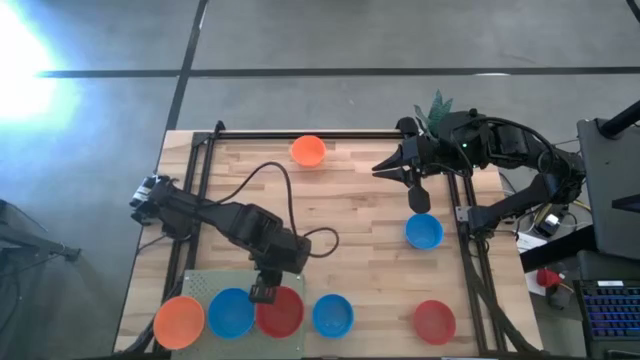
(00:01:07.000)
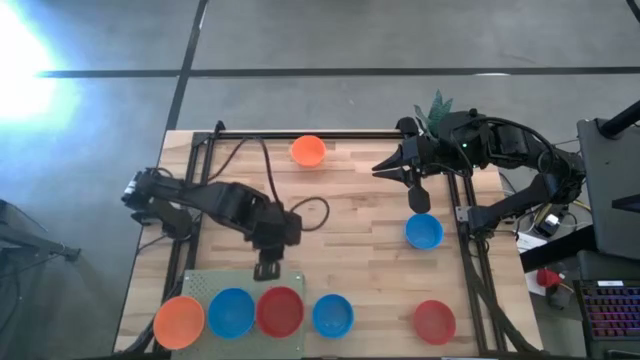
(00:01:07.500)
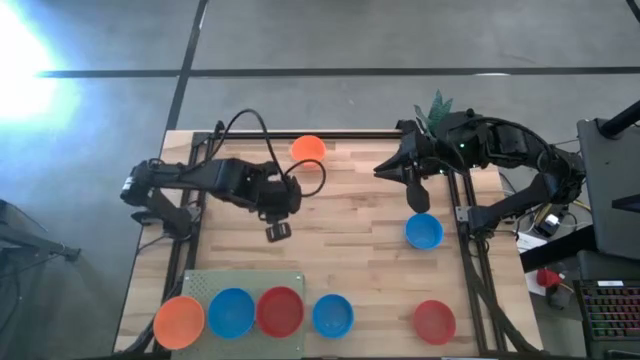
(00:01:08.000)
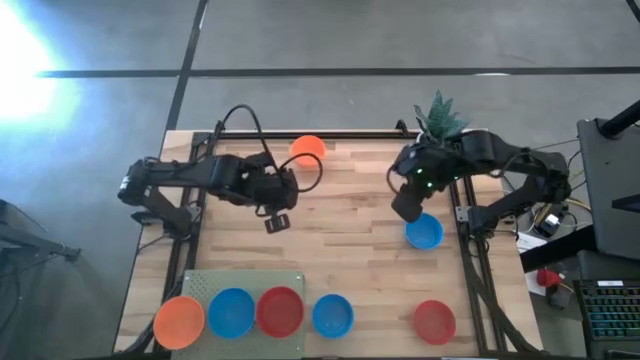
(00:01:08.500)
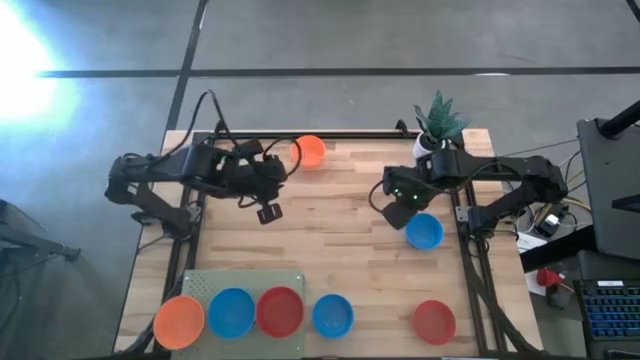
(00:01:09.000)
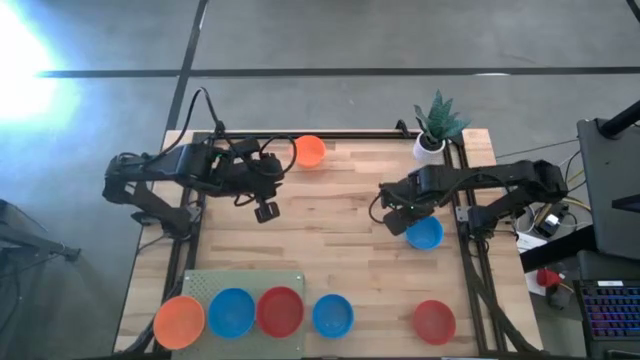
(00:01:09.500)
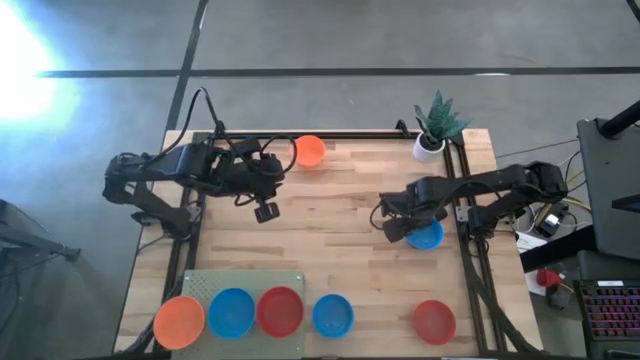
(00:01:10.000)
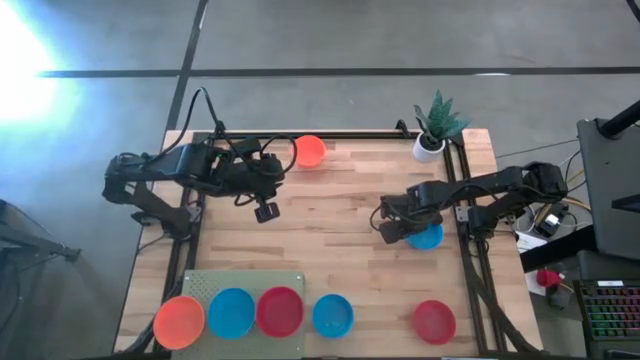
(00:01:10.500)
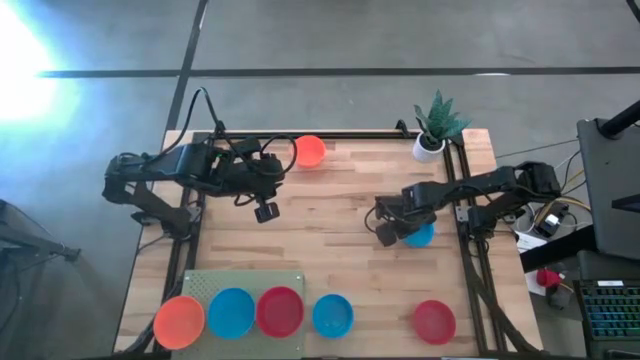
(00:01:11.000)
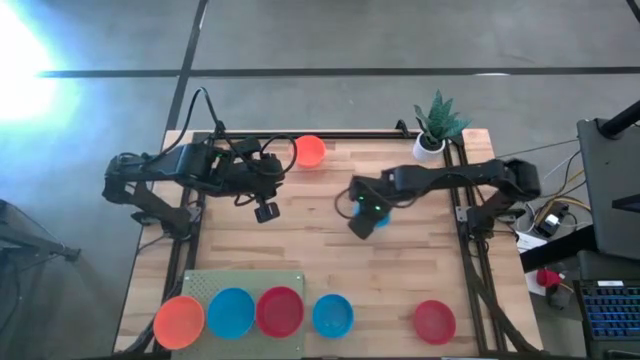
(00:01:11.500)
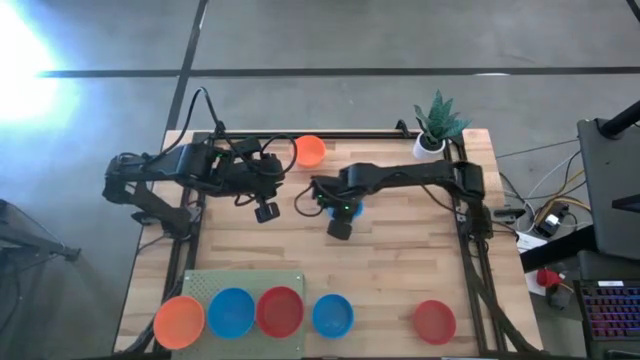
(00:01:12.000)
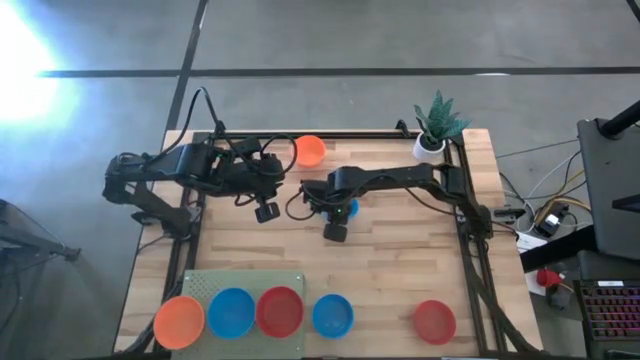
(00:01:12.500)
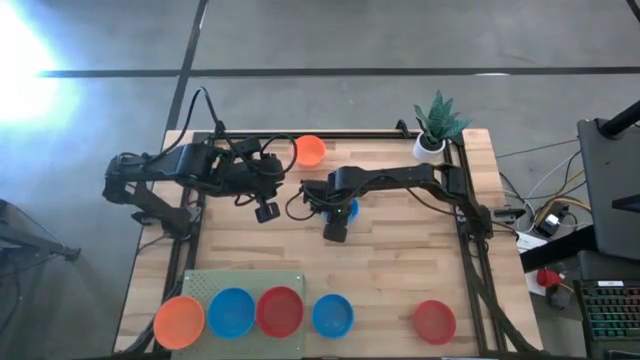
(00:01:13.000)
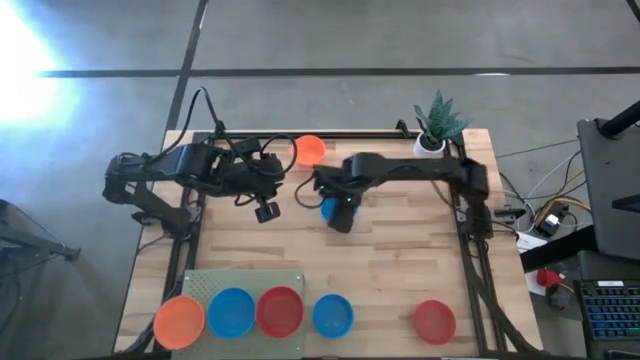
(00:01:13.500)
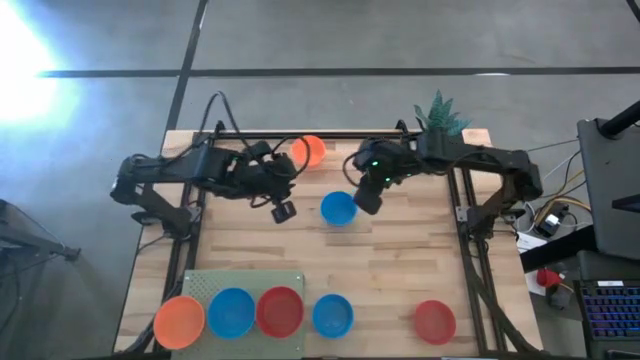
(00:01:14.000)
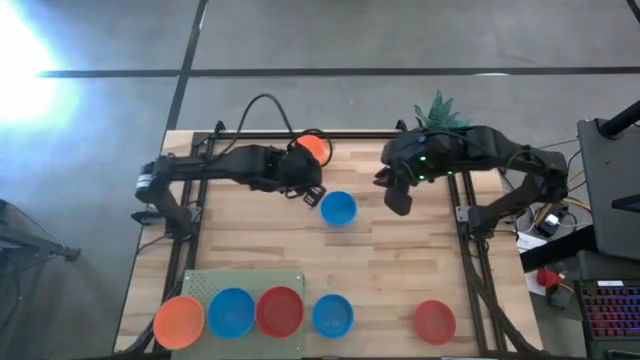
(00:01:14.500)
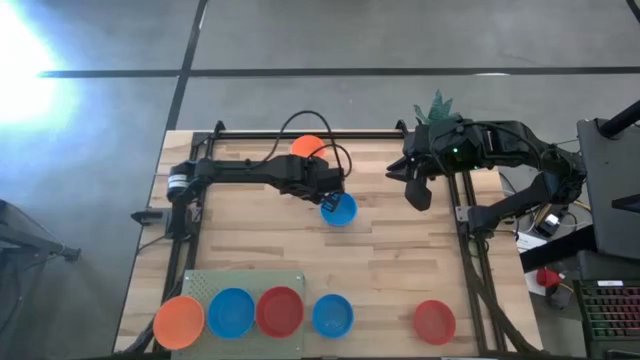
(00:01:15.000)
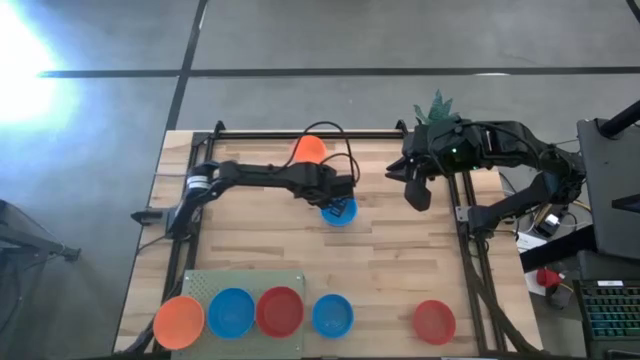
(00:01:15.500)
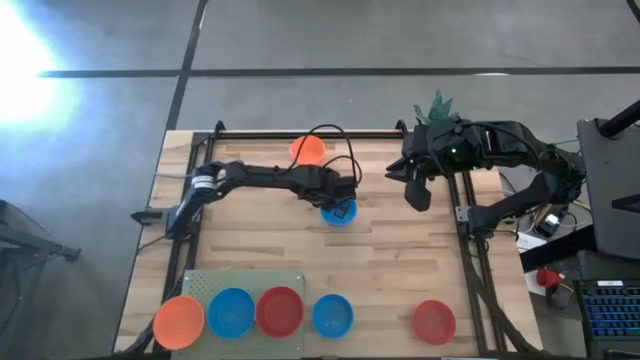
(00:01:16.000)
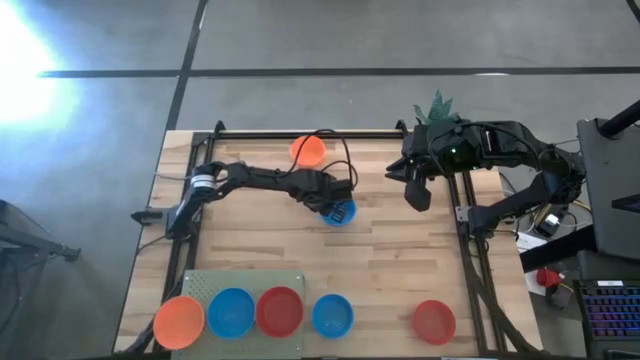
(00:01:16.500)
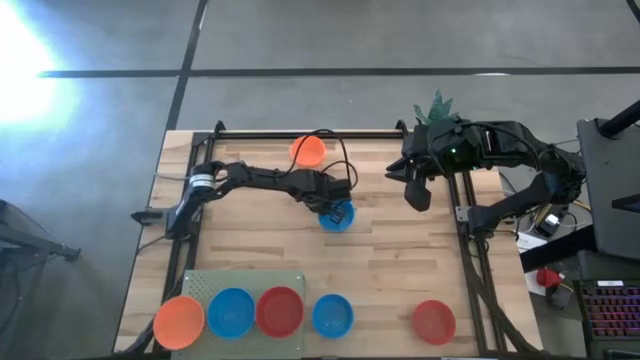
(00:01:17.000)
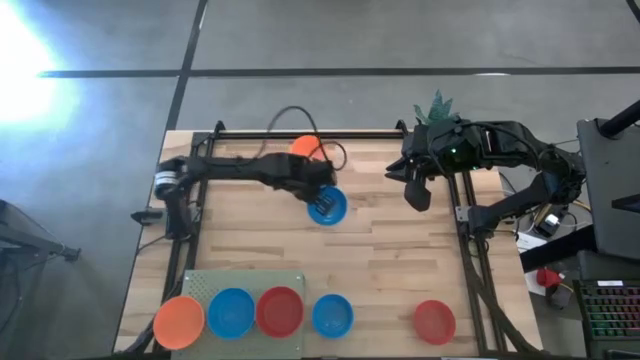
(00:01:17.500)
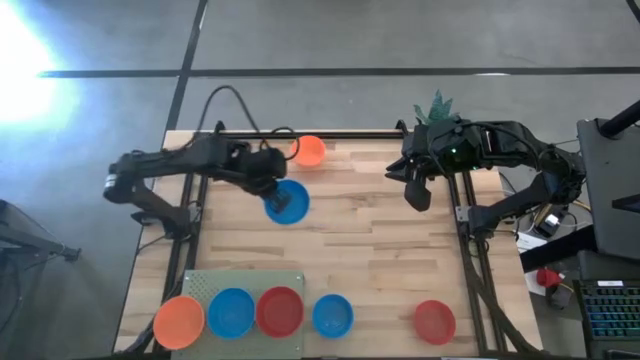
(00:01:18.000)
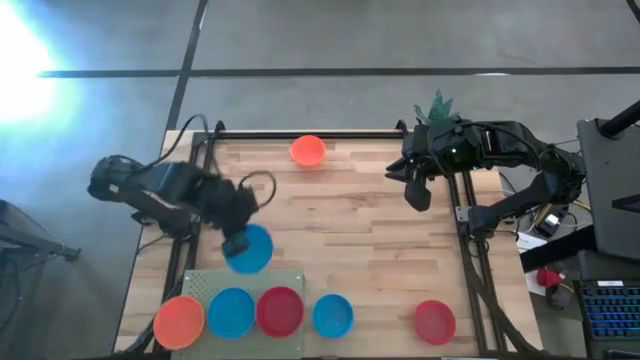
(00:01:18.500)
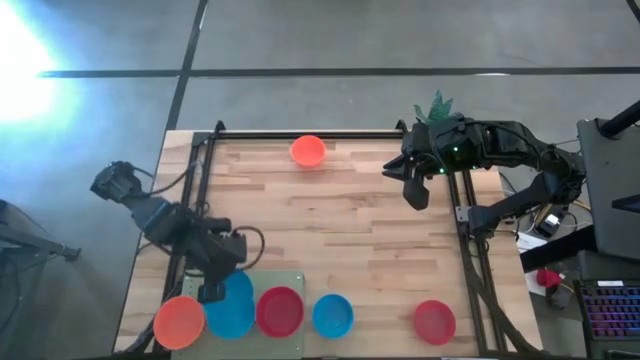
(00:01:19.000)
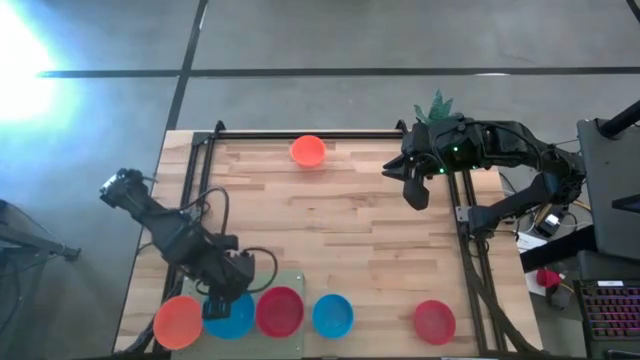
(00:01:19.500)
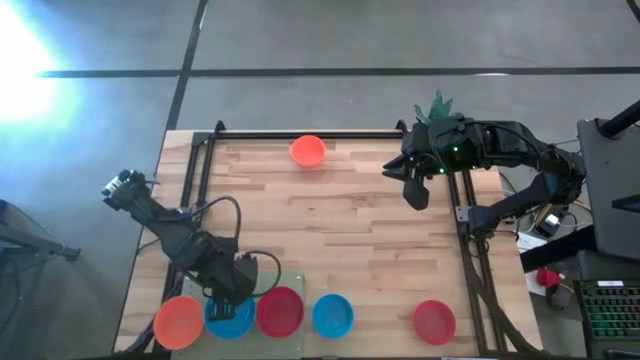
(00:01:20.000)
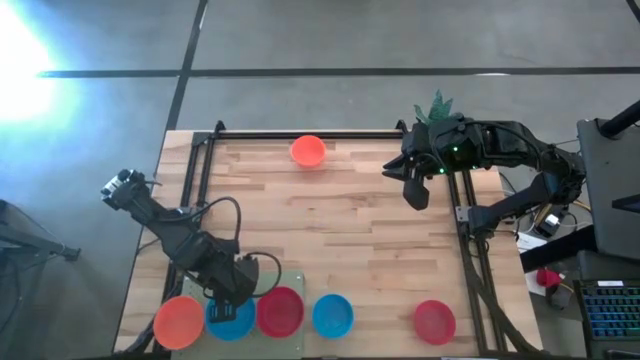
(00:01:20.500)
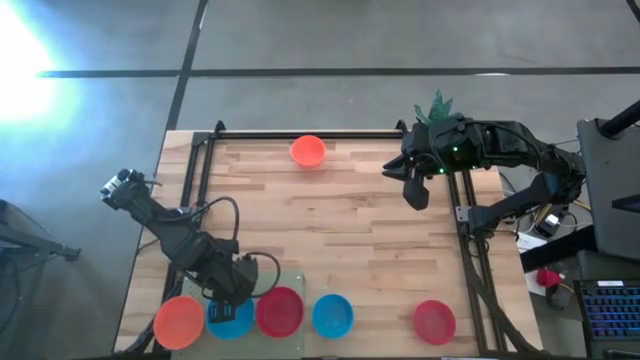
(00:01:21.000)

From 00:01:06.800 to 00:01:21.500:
Task: Pick & Place Mini bowls
Stack the top blue bowl on the blue bowl on the shelf

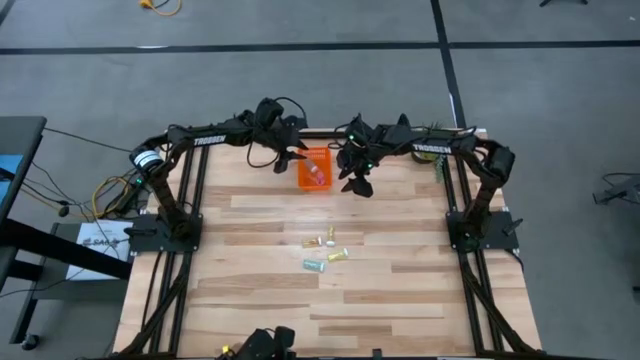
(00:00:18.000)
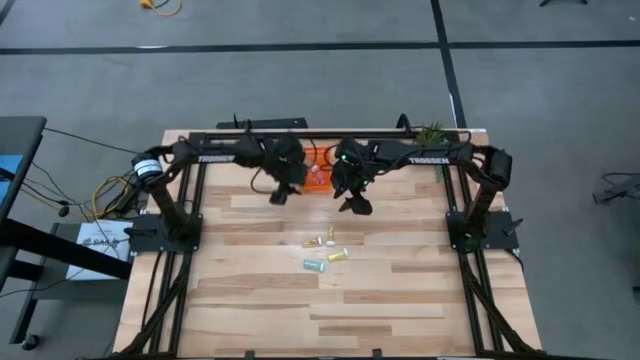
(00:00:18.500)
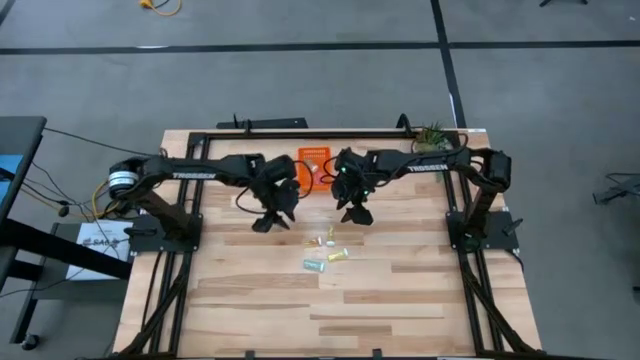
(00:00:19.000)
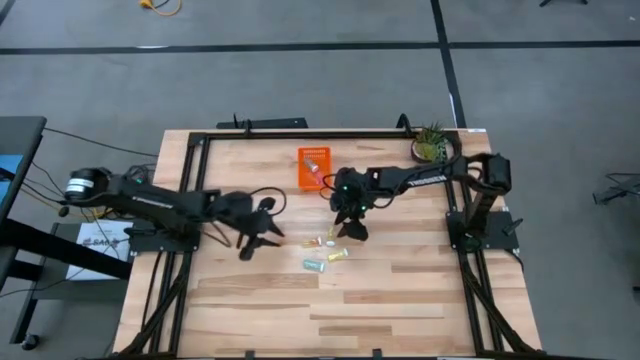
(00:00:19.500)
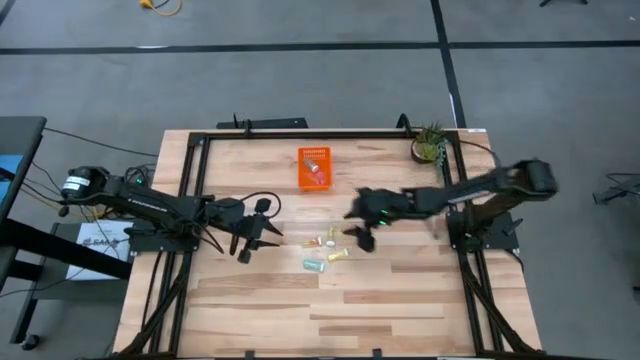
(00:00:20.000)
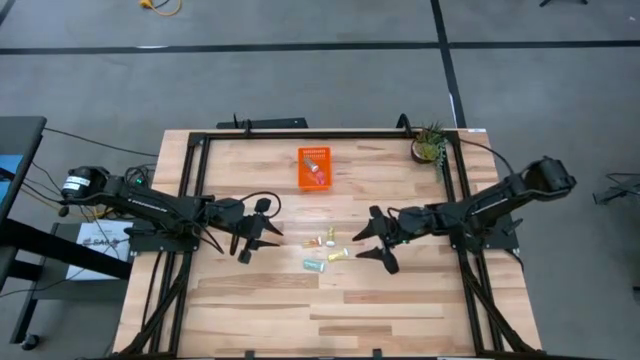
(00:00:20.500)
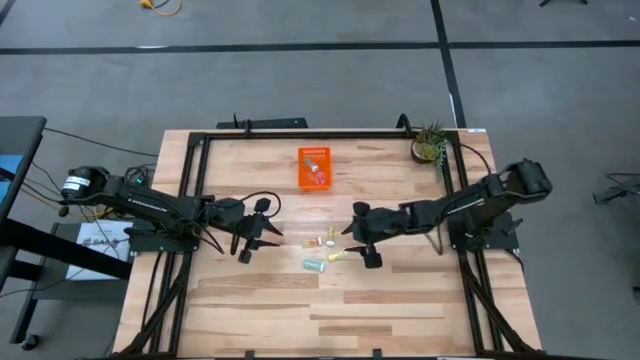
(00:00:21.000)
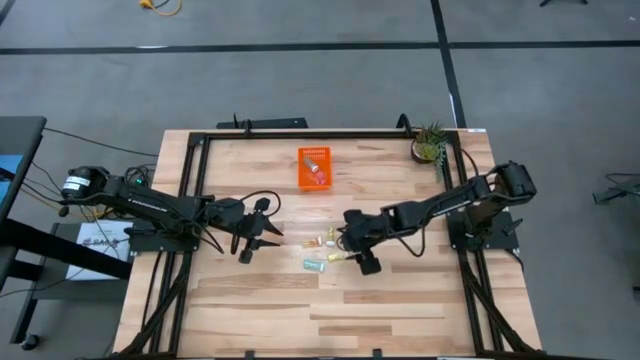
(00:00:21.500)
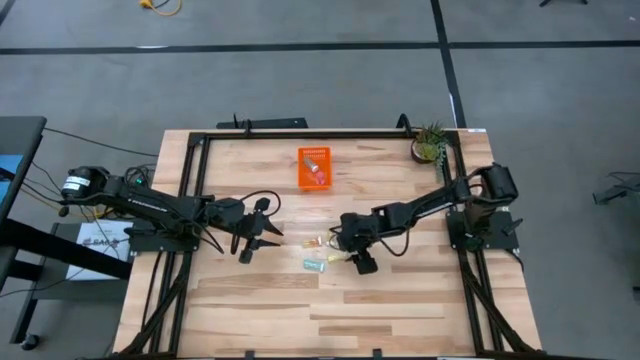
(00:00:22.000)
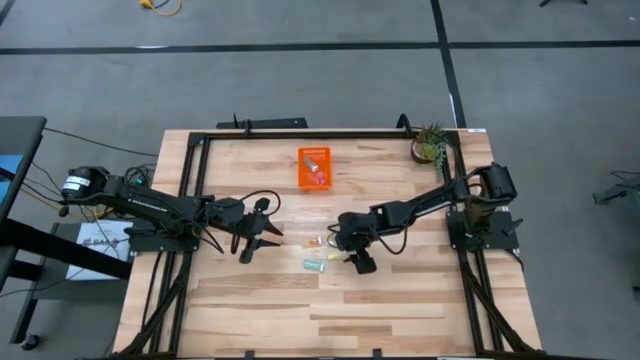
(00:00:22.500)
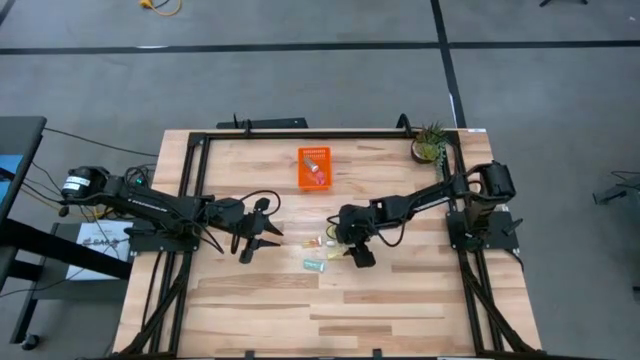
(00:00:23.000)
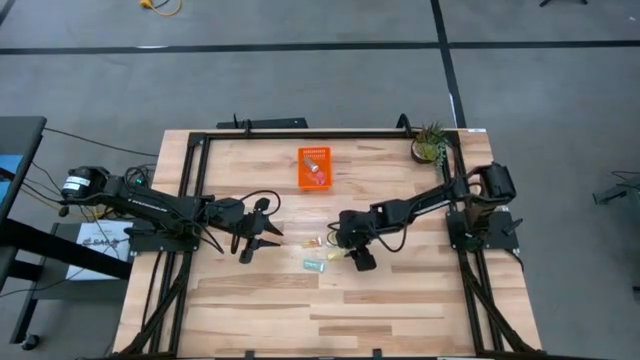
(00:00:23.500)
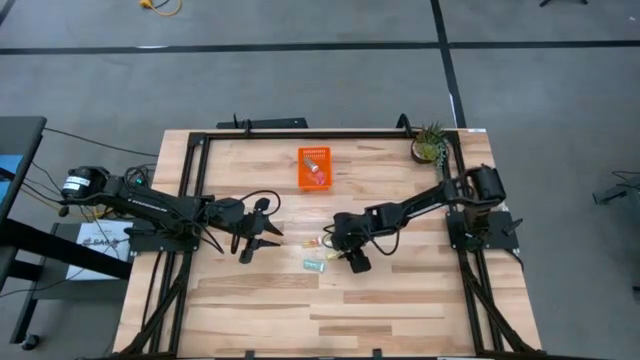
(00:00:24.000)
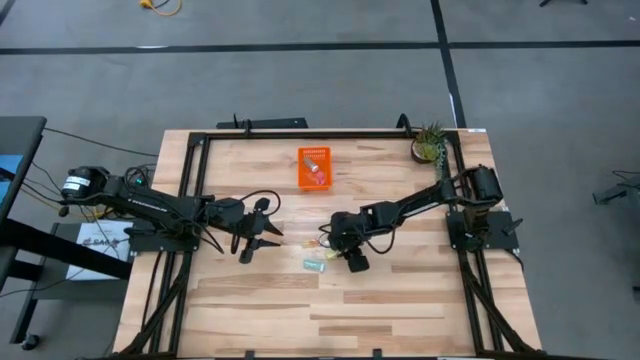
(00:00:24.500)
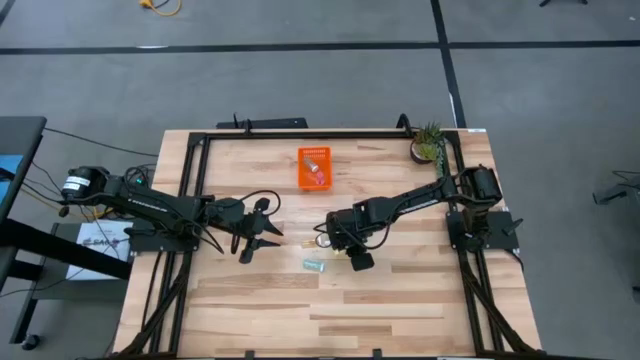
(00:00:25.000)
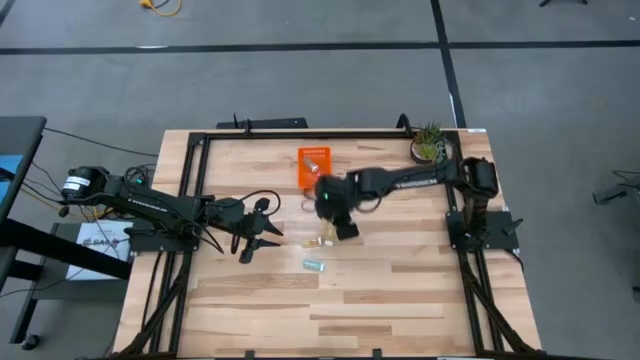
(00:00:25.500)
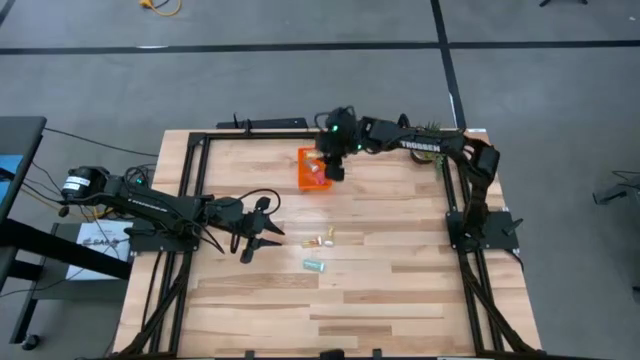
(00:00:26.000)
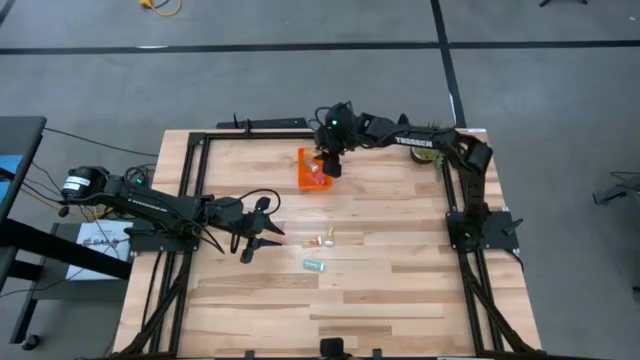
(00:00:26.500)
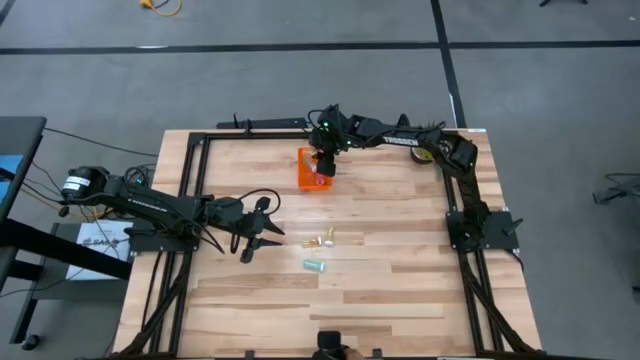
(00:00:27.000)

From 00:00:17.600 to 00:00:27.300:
Task: Pick and place pill bottles into a basket
Put the yellow pill bottle into the orange bin
